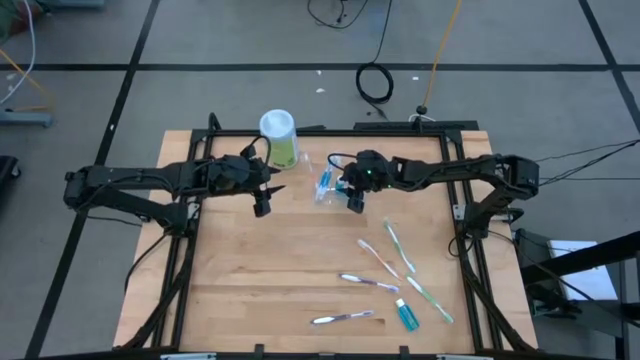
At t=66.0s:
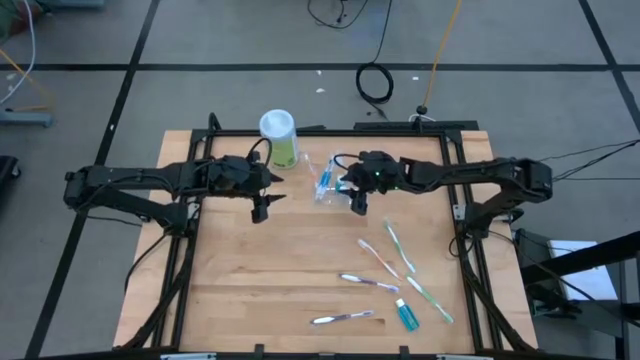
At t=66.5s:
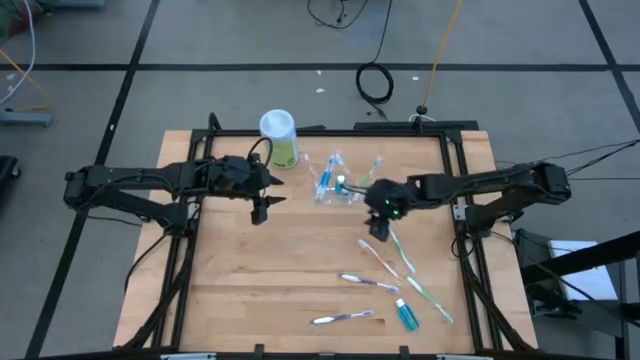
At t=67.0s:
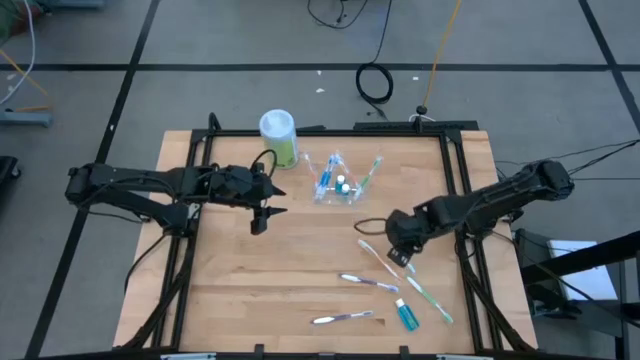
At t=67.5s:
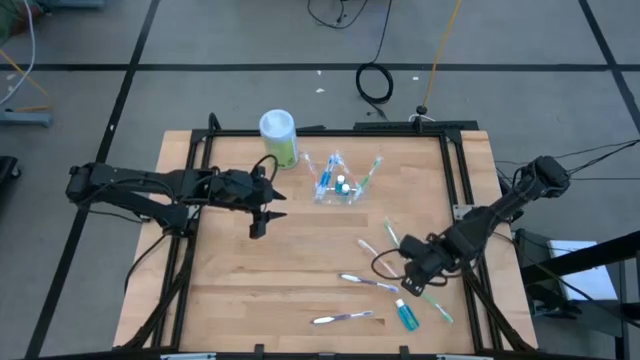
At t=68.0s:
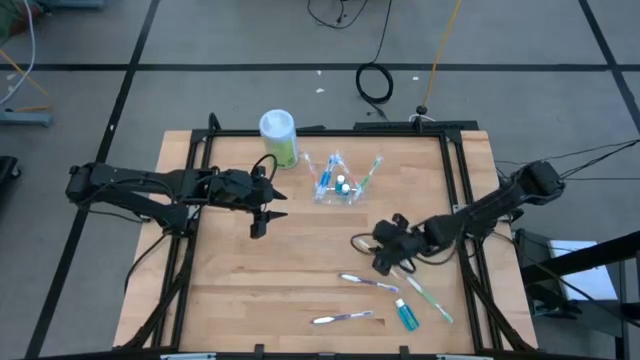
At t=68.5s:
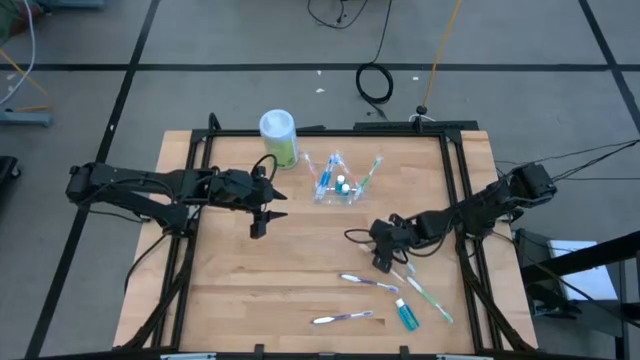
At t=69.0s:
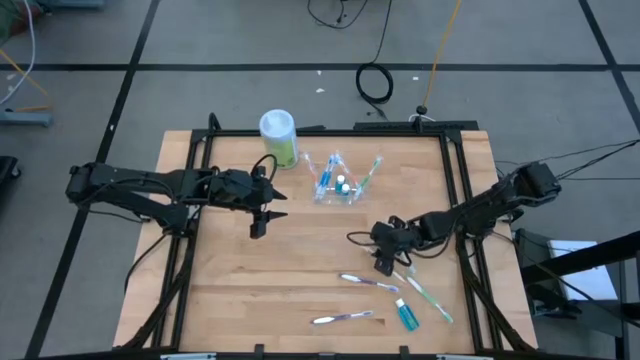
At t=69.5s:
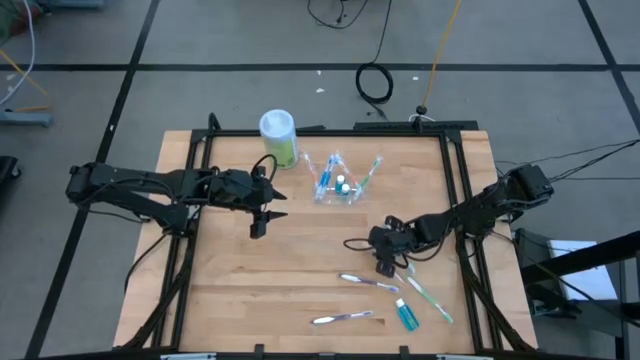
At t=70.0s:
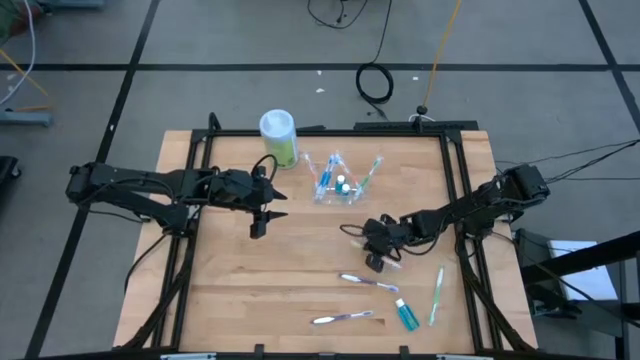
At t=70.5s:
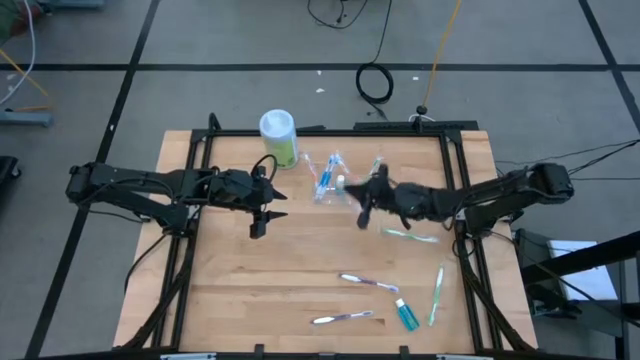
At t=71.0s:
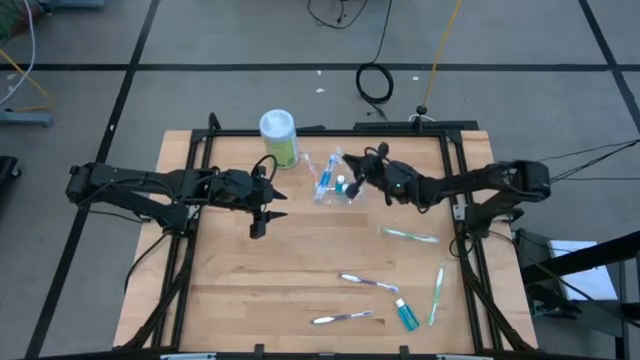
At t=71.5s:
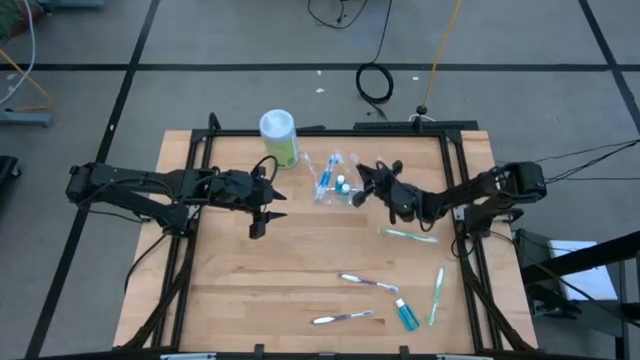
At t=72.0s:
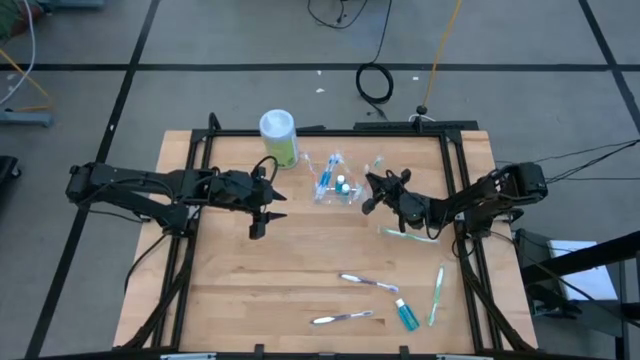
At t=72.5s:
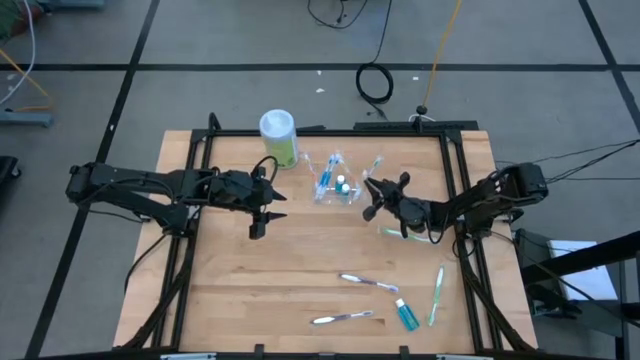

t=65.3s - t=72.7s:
Task: Pick & Place toothbrushing station
Put the orange toothbrush into the transparent organizer

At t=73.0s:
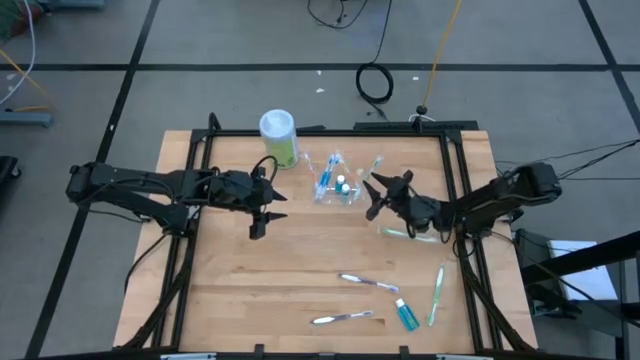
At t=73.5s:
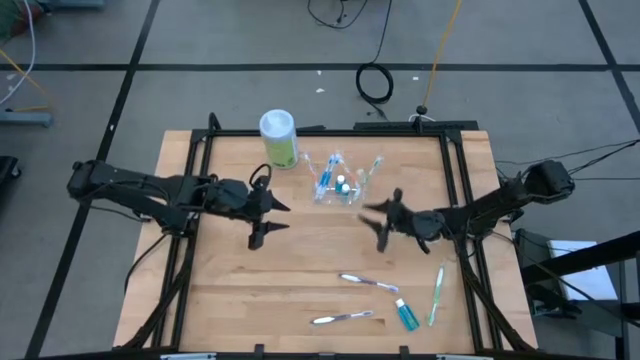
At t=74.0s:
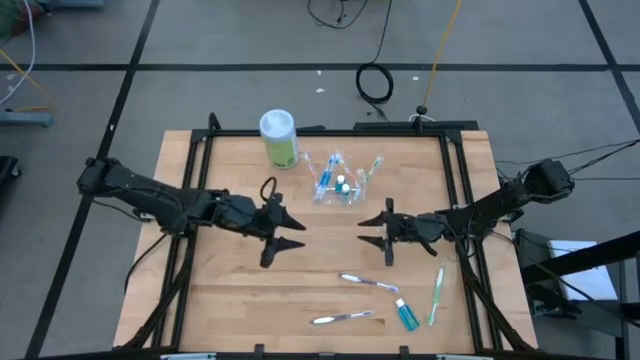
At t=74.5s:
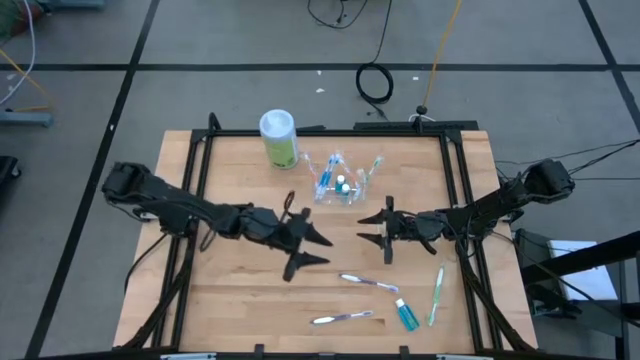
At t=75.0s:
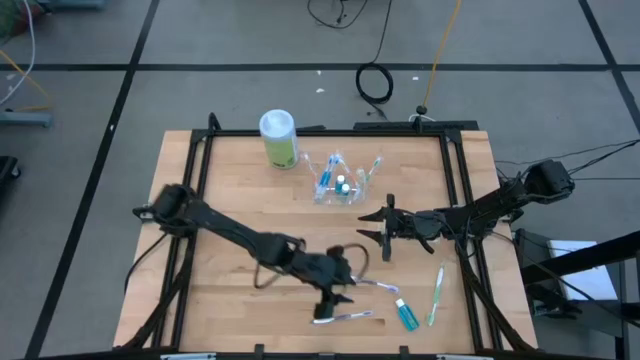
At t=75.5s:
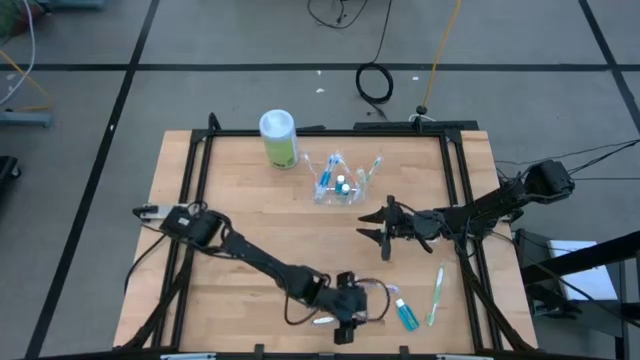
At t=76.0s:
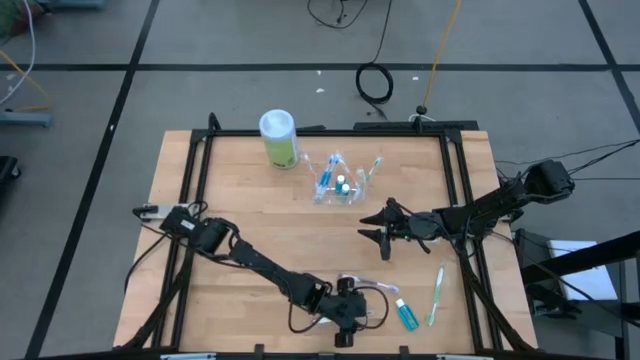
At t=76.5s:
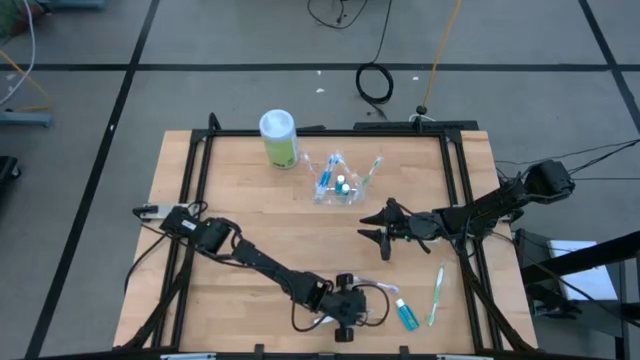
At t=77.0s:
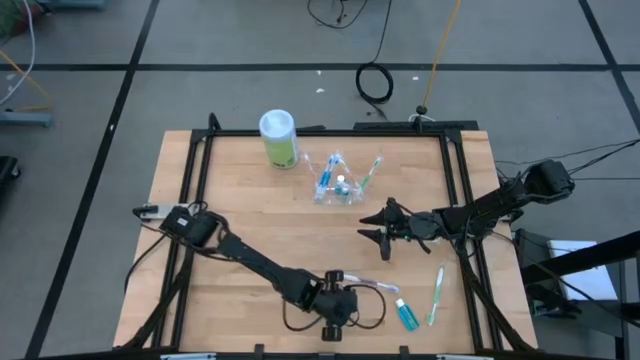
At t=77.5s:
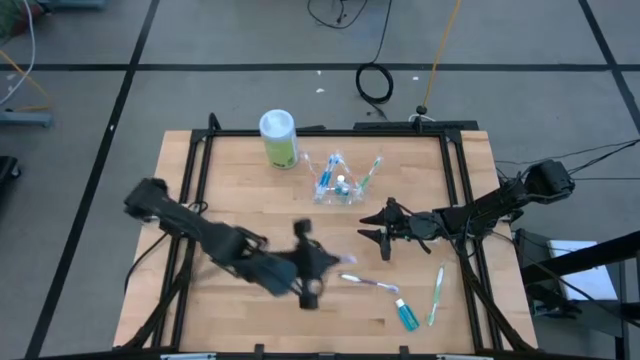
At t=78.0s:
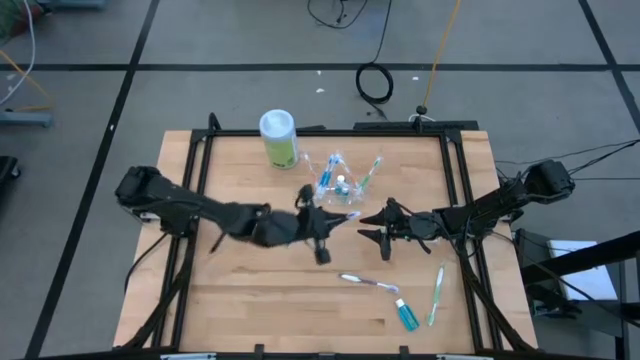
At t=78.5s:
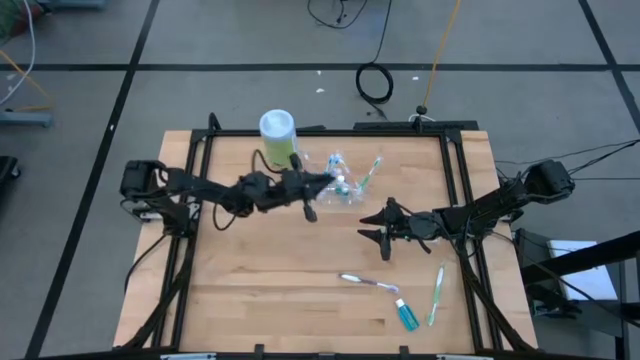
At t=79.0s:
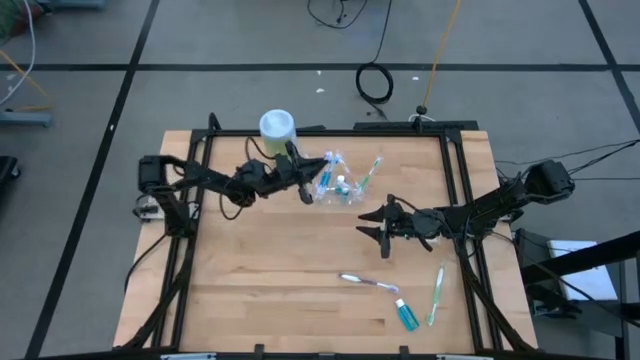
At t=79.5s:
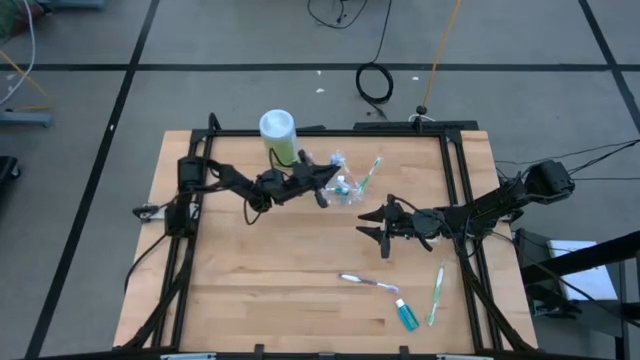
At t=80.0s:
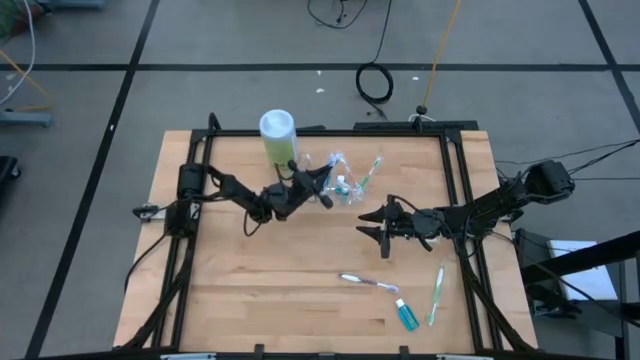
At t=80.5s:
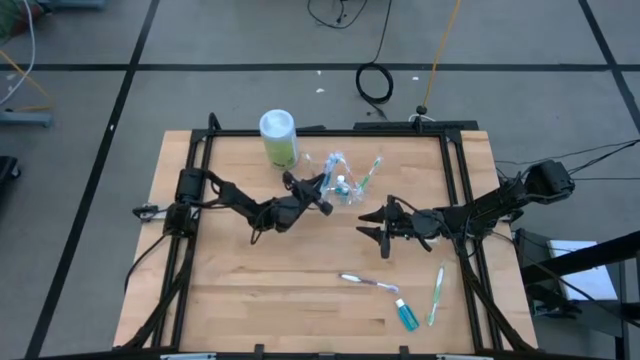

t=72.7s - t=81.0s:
Put the bottom purple toothbrush into the transparent organizer

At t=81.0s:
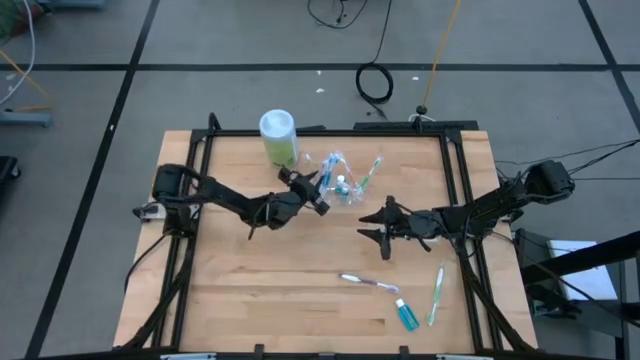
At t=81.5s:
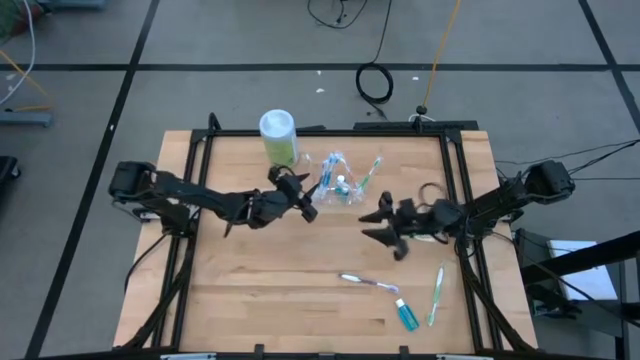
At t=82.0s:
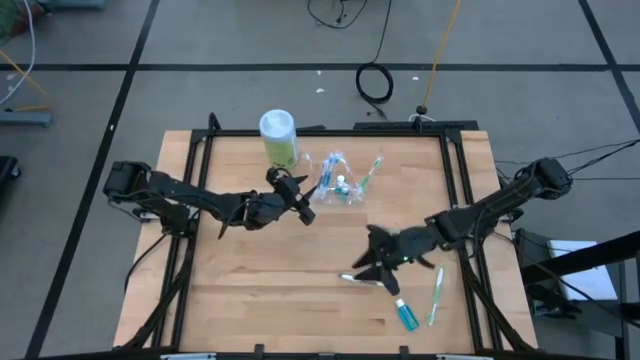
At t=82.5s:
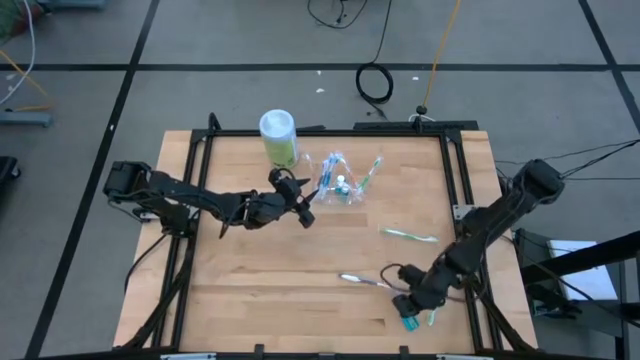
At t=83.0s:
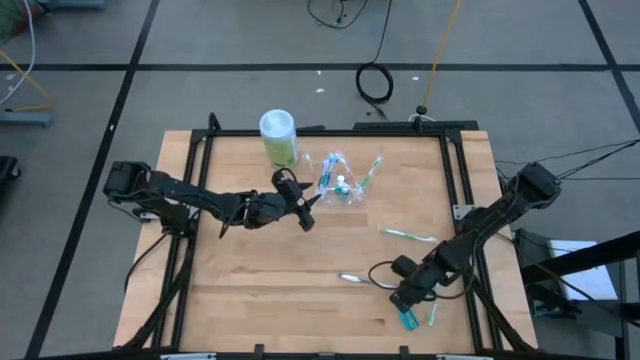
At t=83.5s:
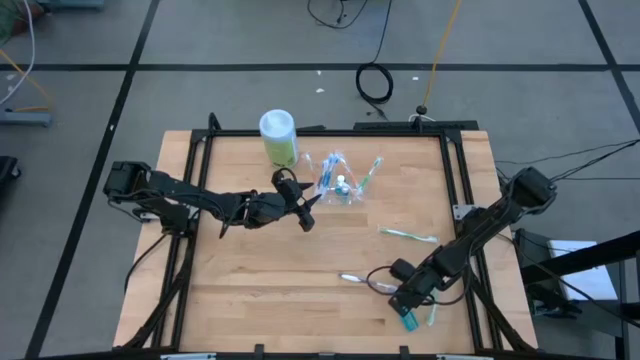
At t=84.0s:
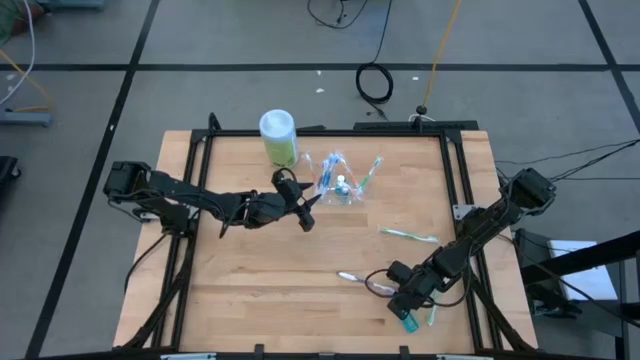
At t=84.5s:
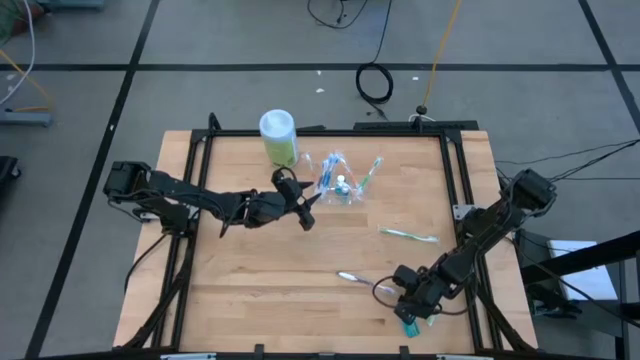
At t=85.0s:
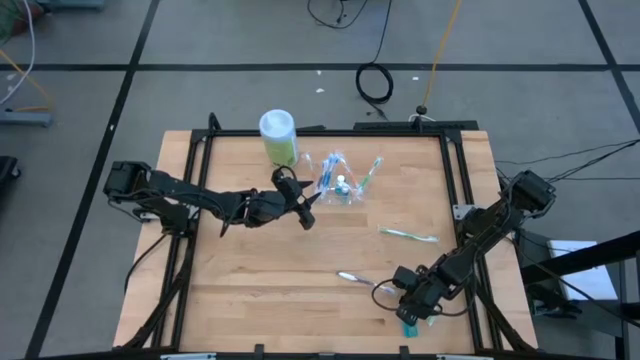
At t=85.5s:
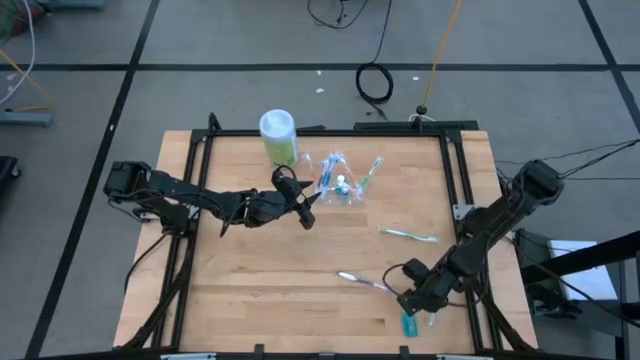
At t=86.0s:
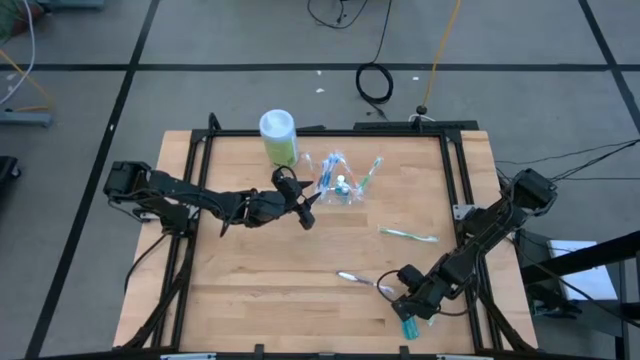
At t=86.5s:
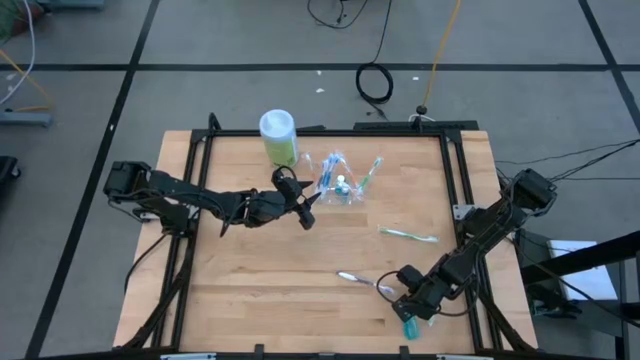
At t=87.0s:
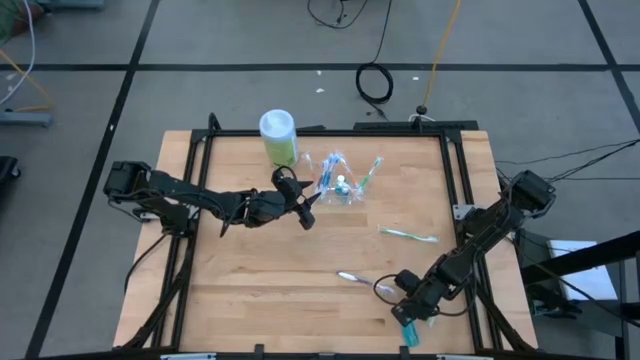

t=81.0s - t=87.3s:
Put the blue mouthwash into the transparent organizer
